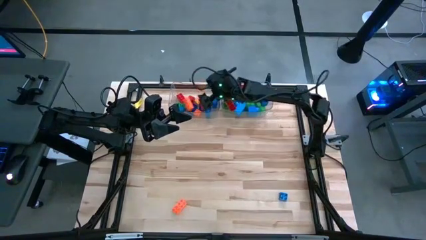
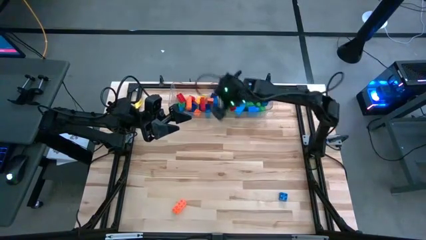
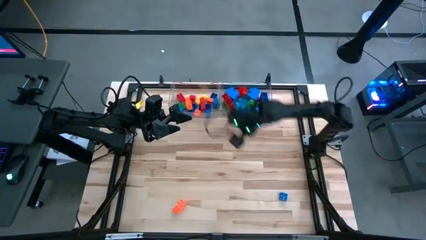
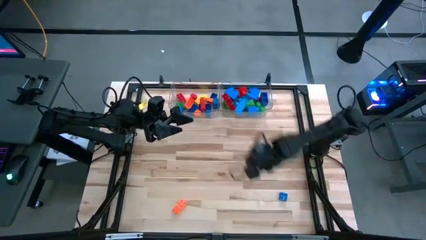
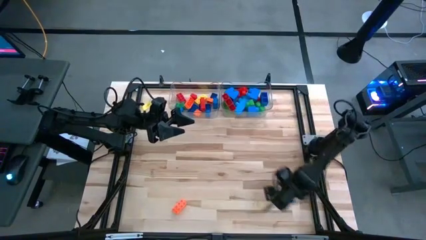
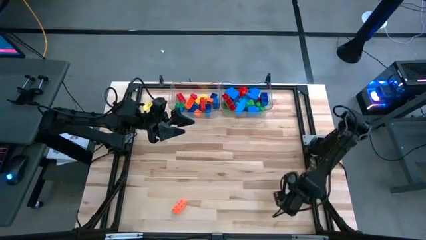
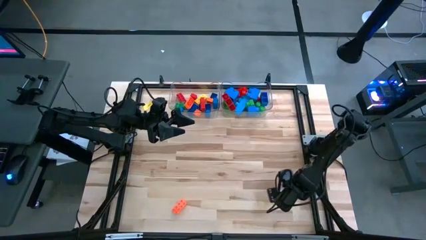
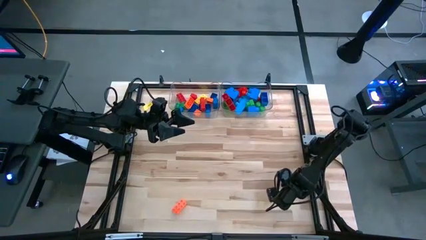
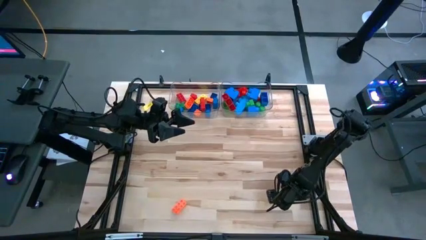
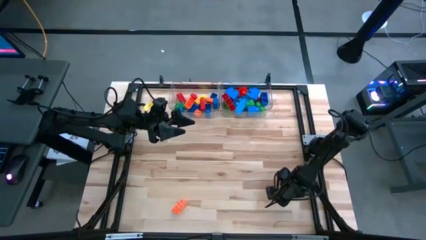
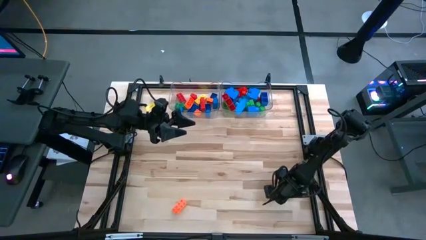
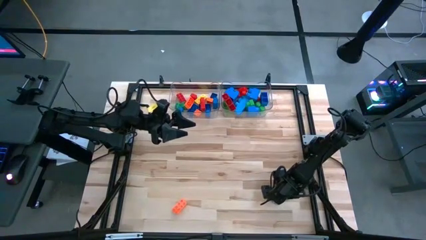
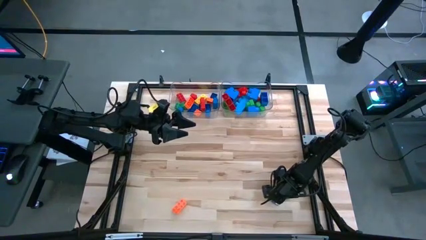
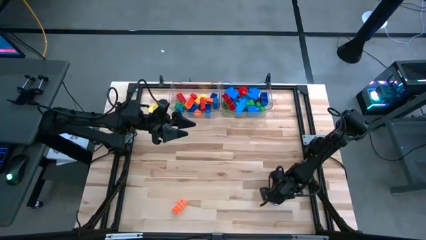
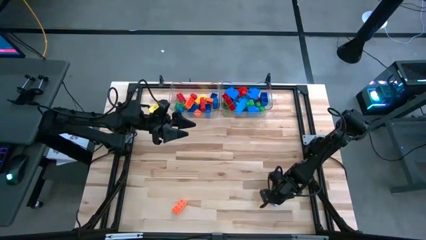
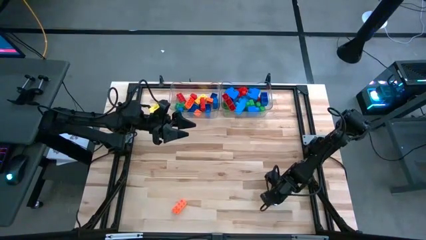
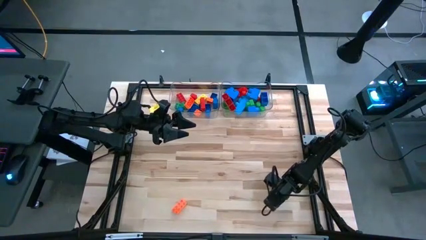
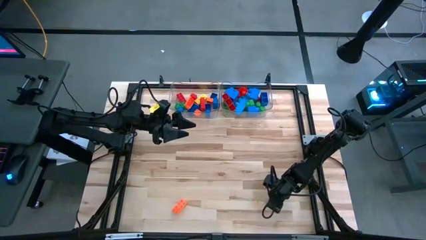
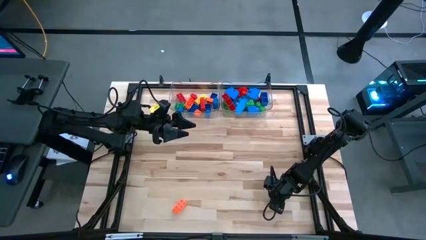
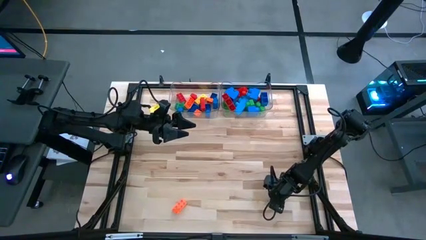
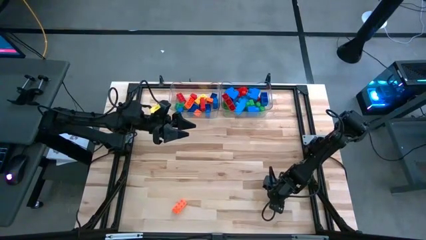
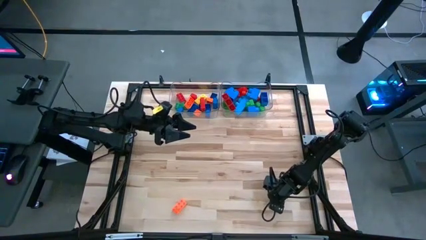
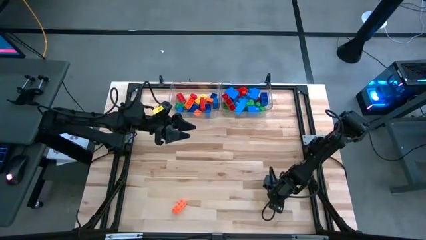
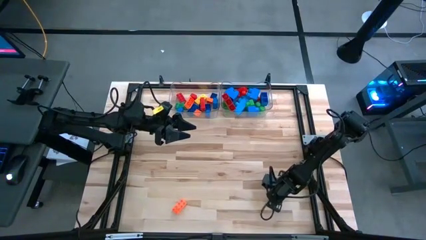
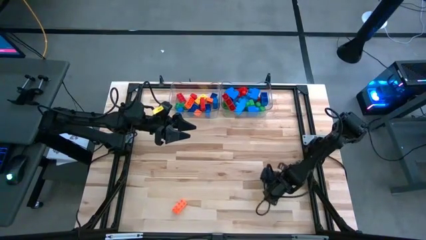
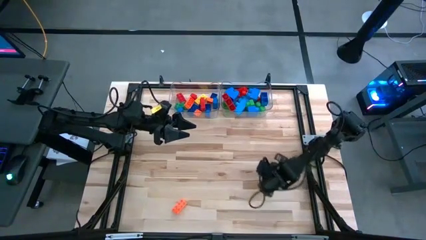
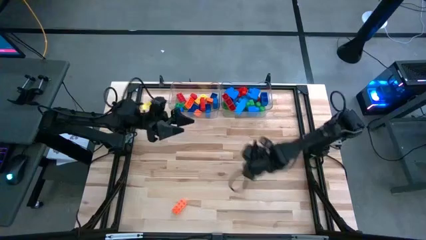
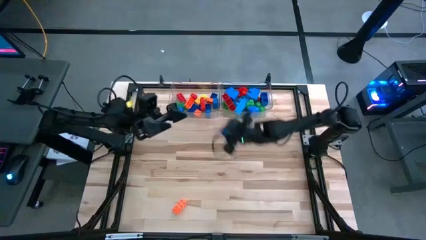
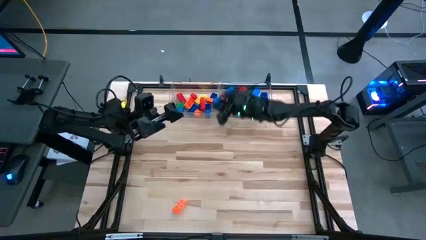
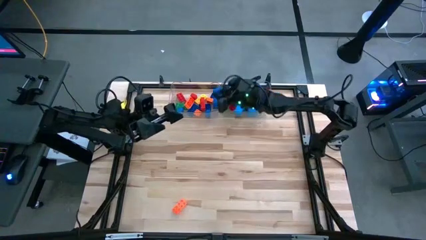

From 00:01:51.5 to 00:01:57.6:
Task: Sort blocks by size
Put the blue lego piece into the left transparent bin

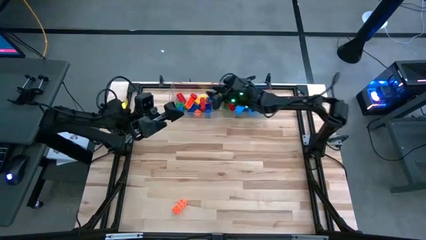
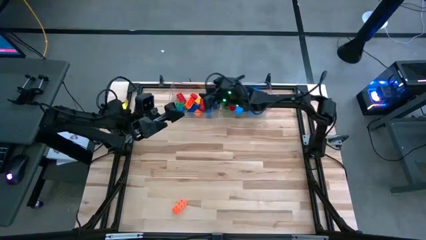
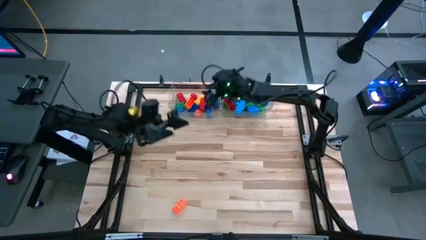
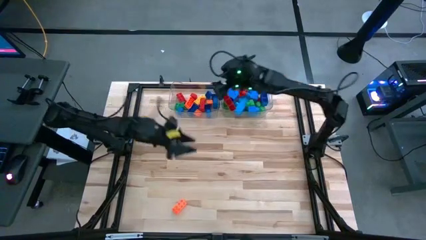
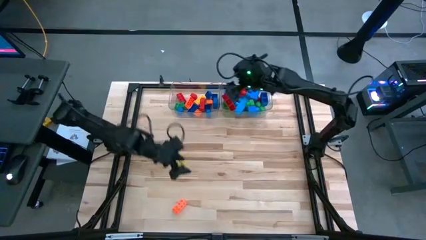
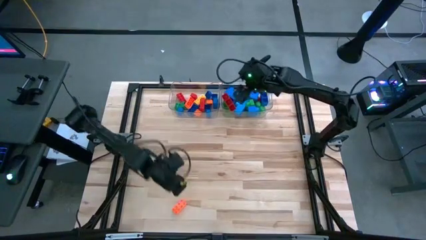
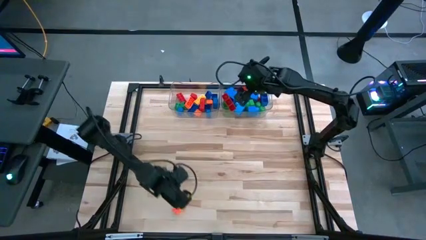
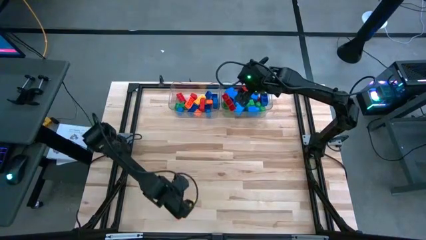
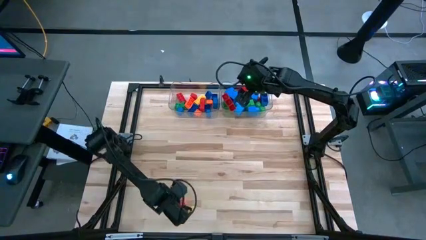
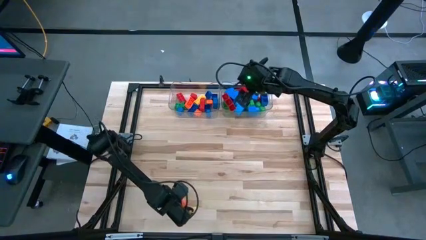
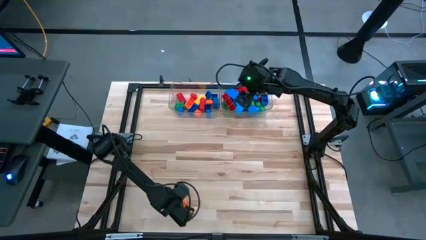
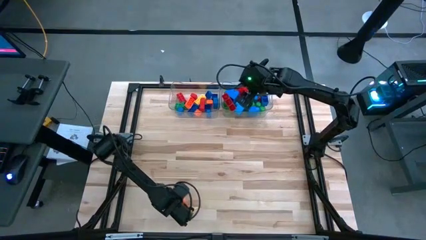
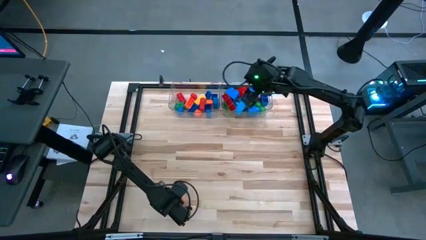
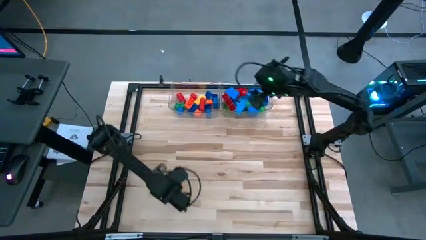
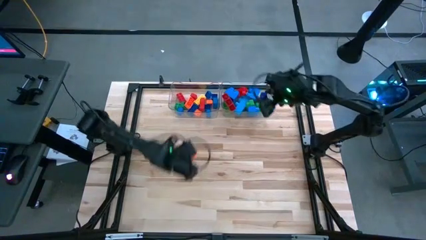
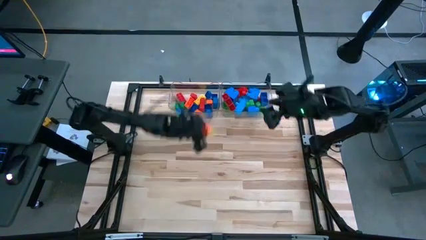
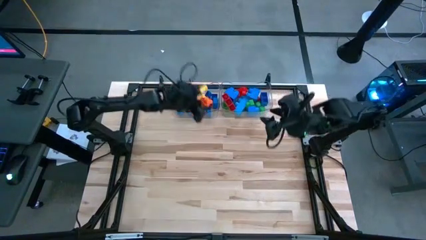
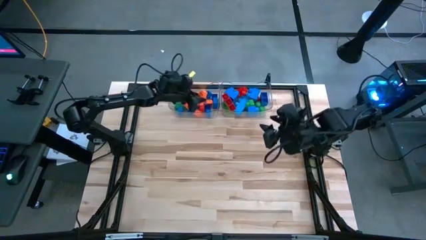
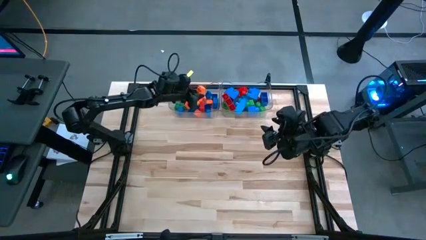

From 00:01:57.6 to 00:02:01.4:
Put the orange lego piece into the left transparent bin

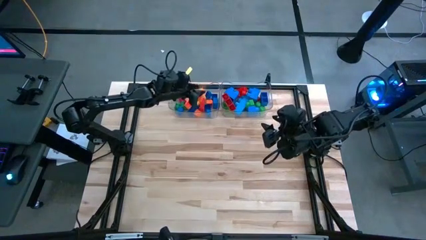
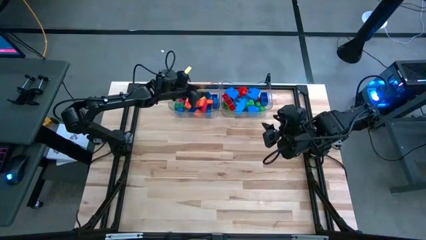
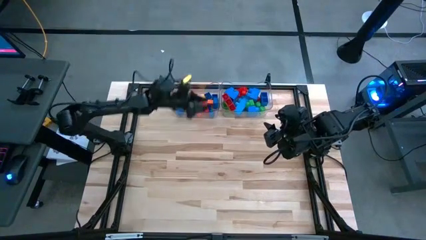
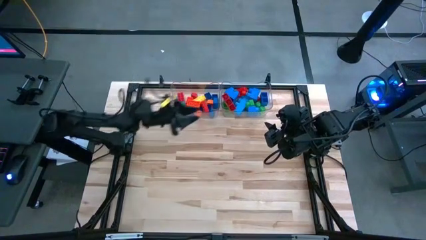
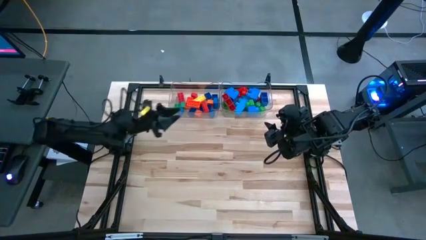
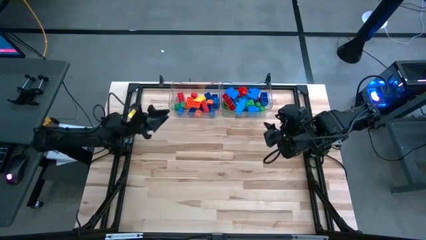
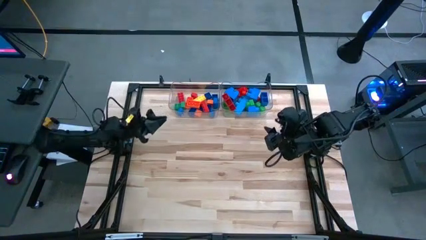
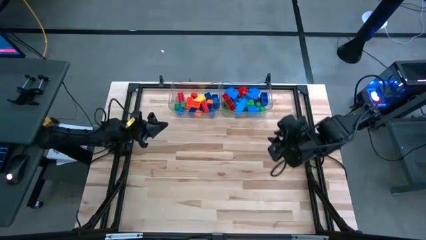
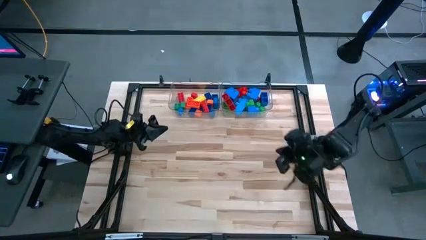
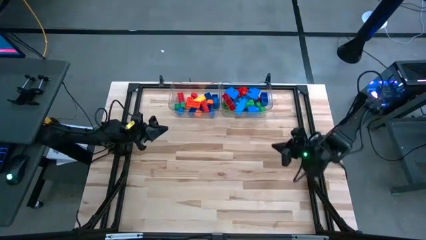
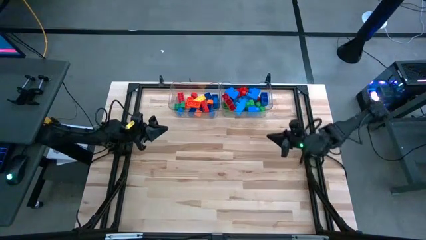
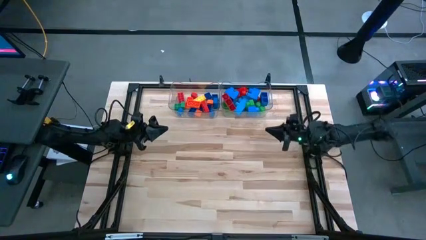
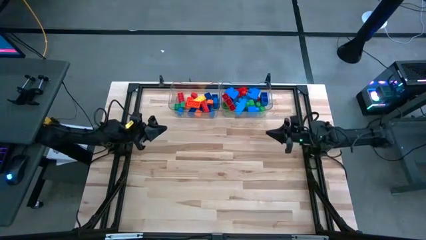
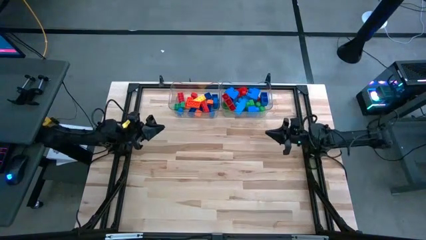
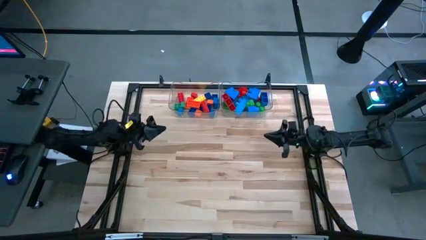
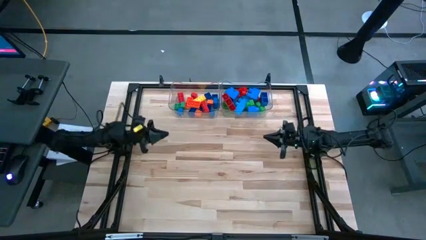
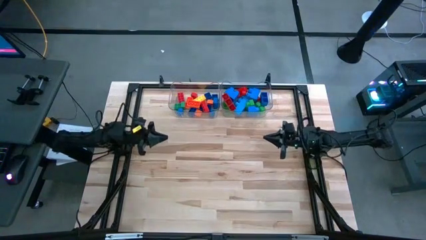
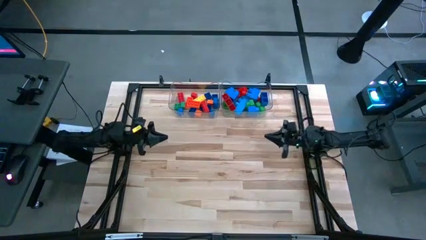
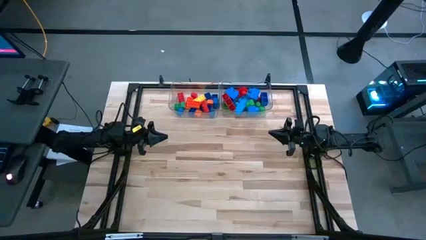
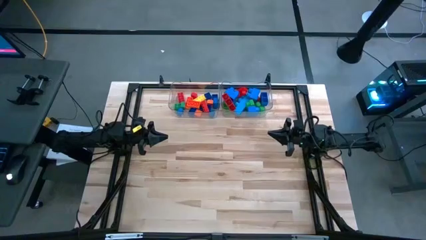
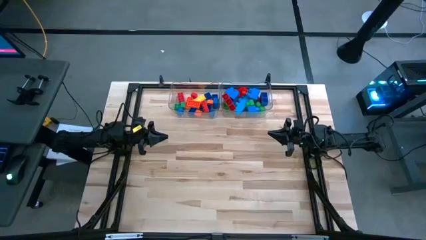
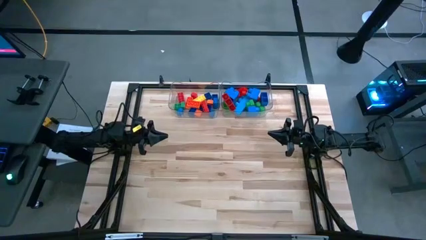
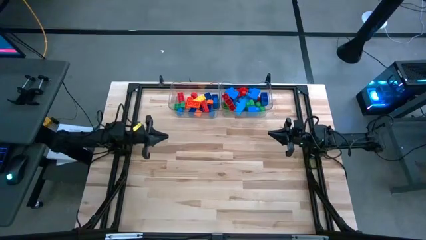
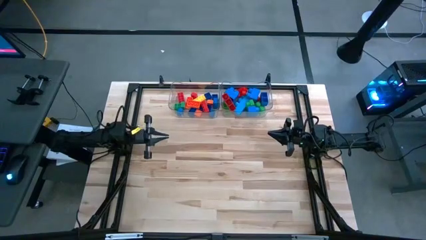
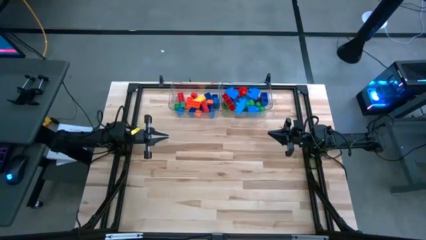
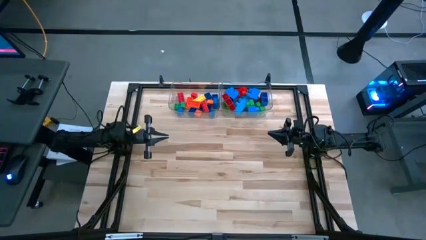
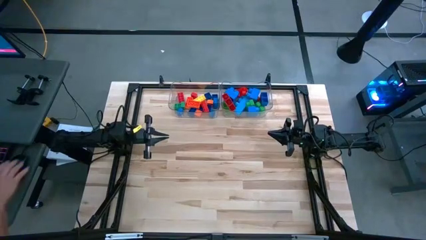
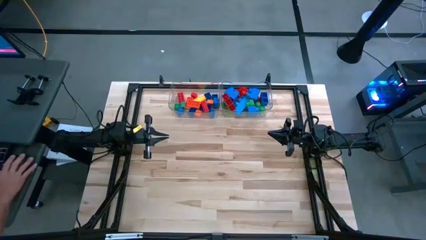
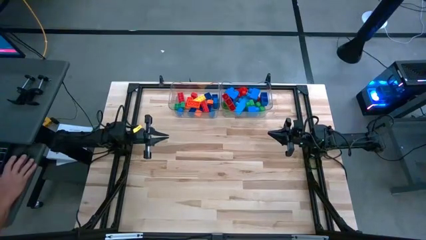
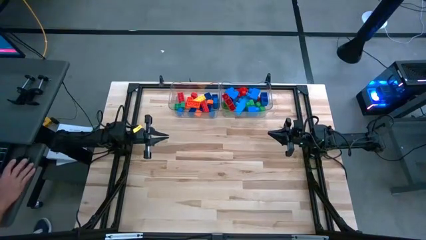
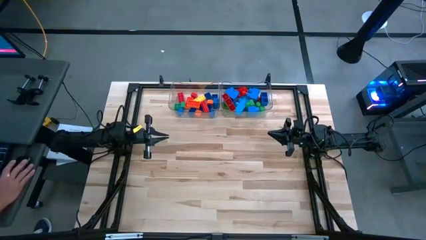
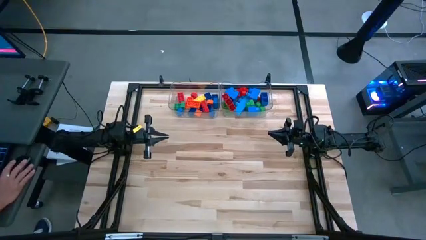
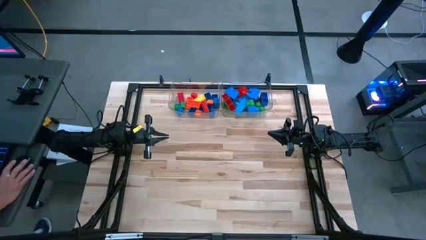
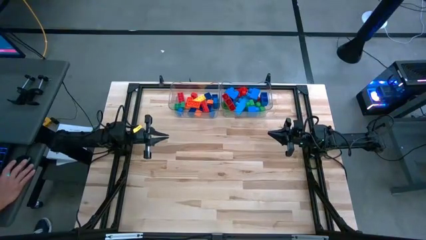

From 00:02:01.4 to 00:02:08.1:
Return to Home Position
